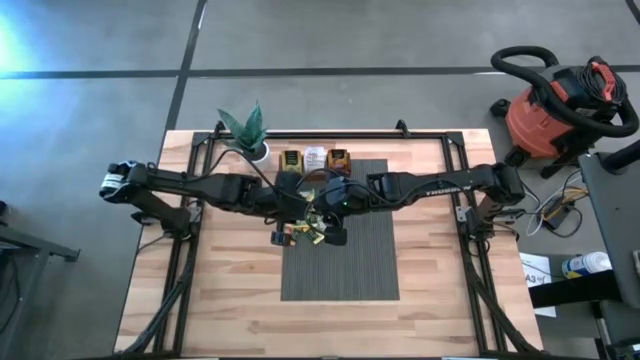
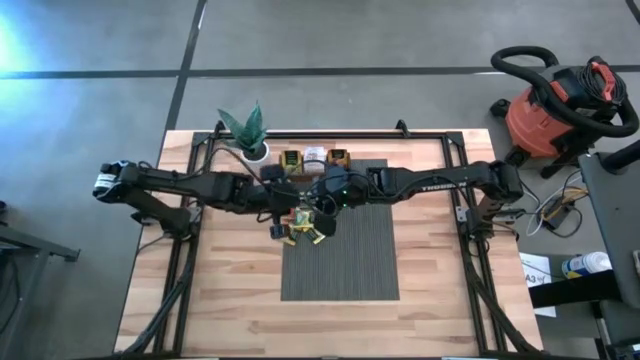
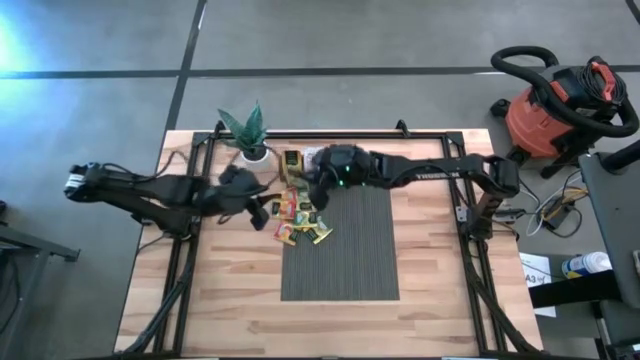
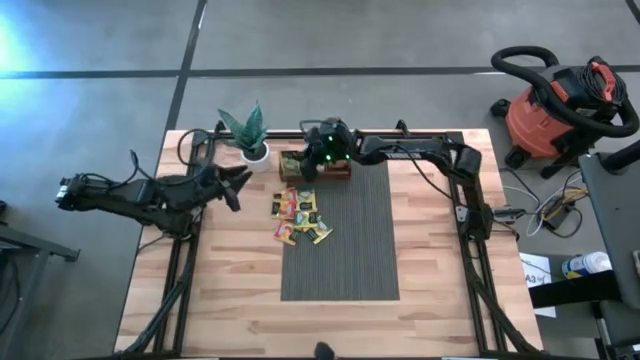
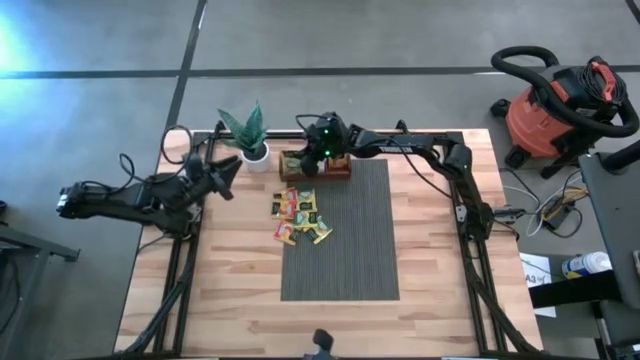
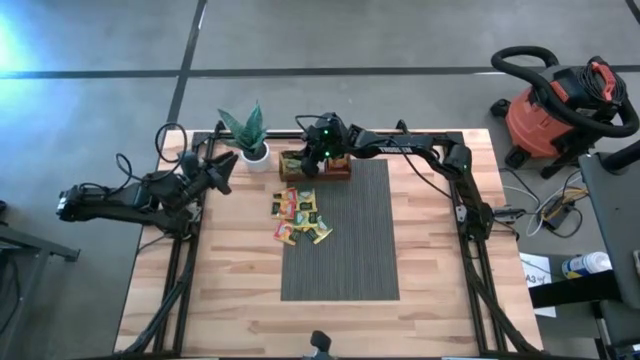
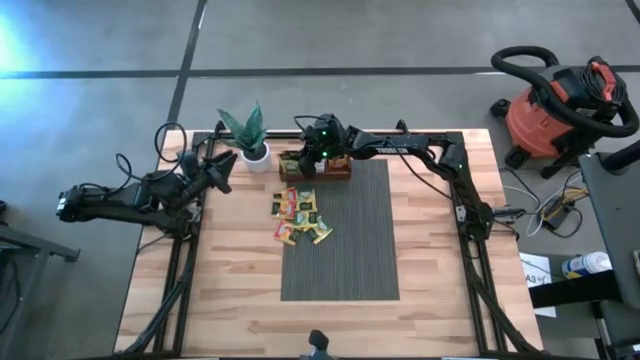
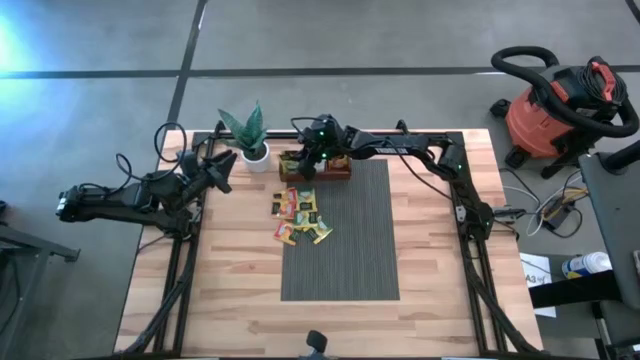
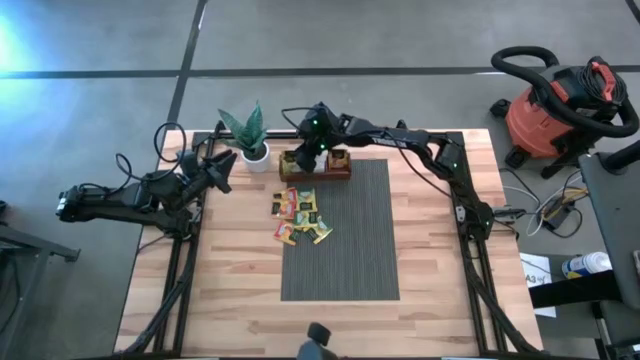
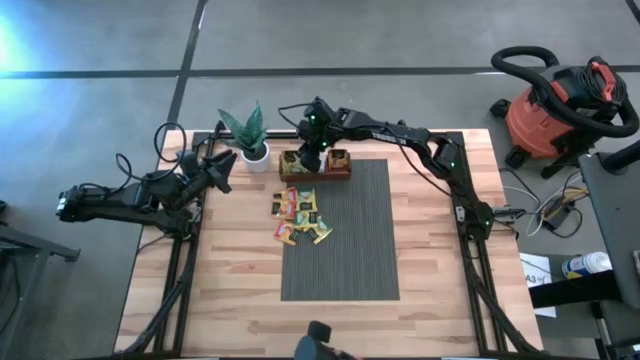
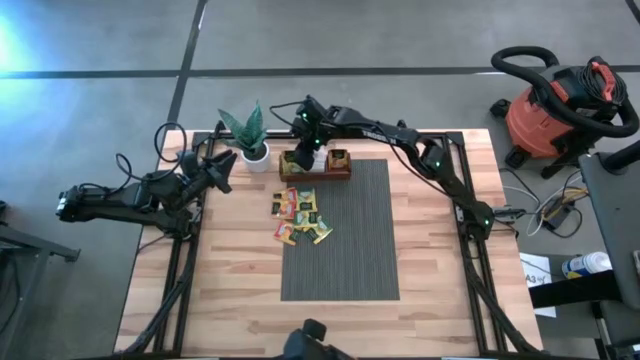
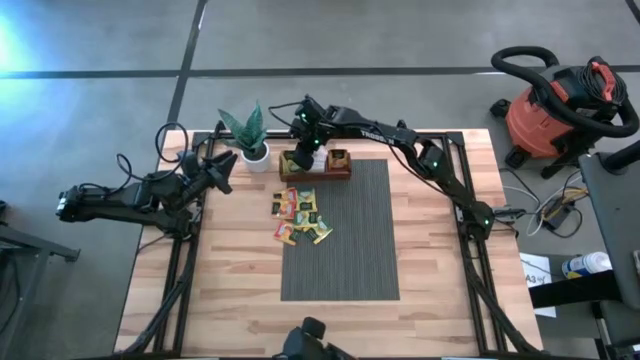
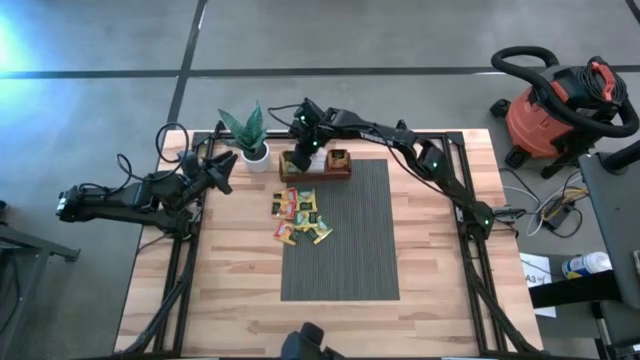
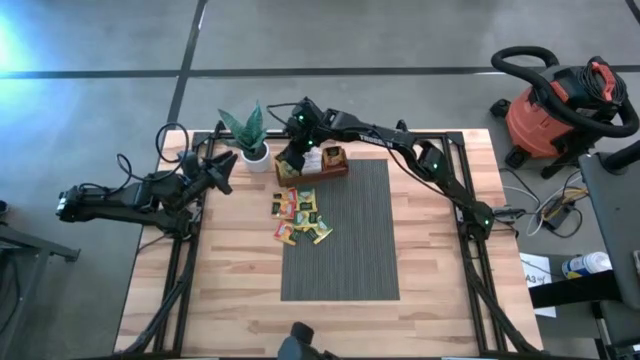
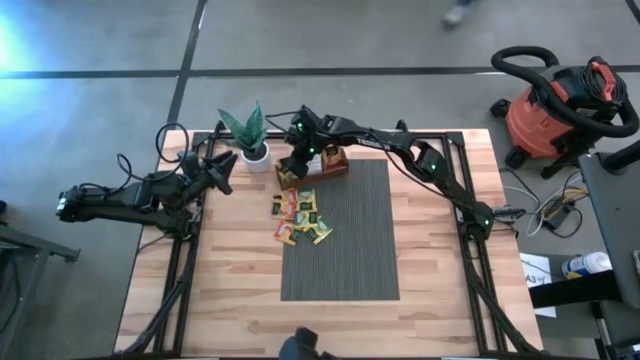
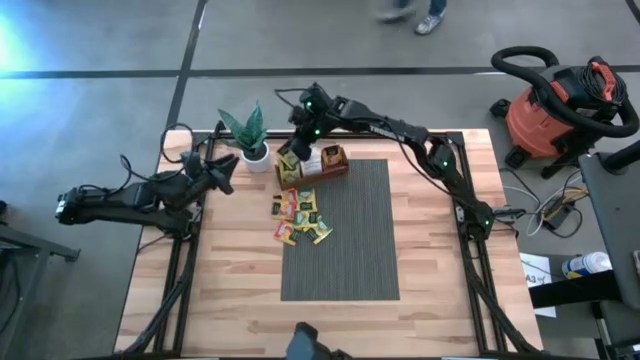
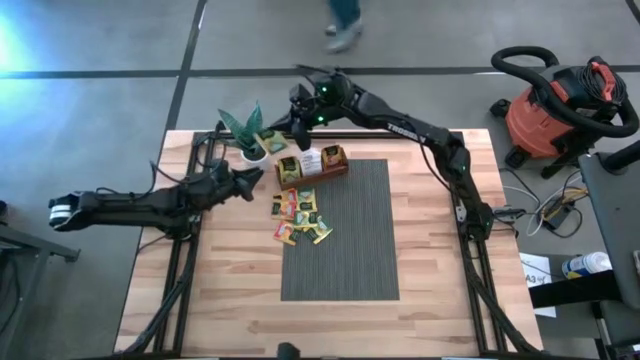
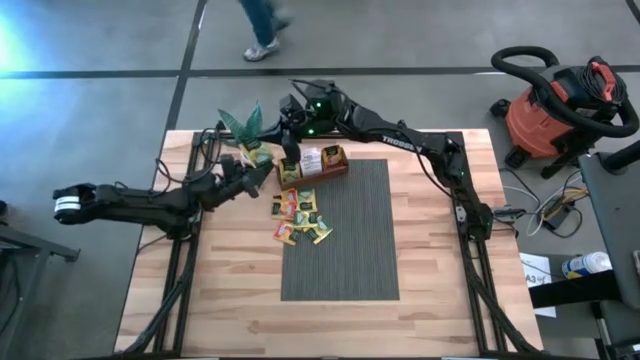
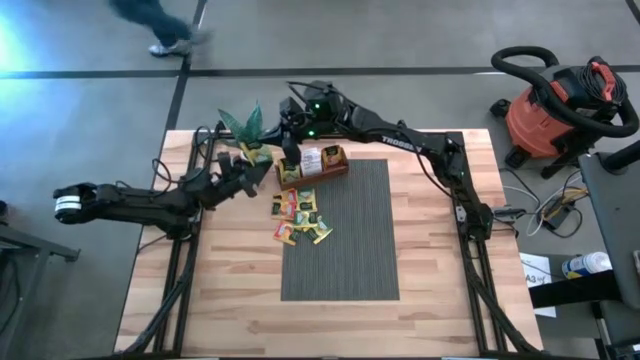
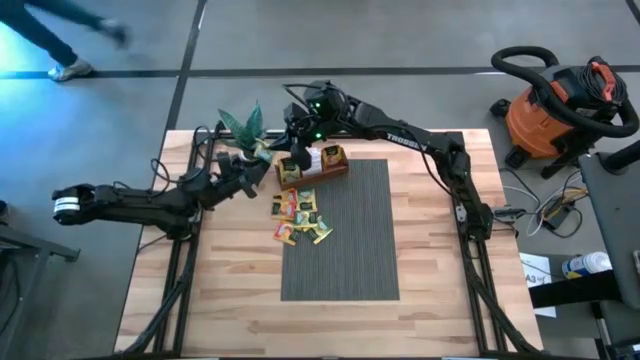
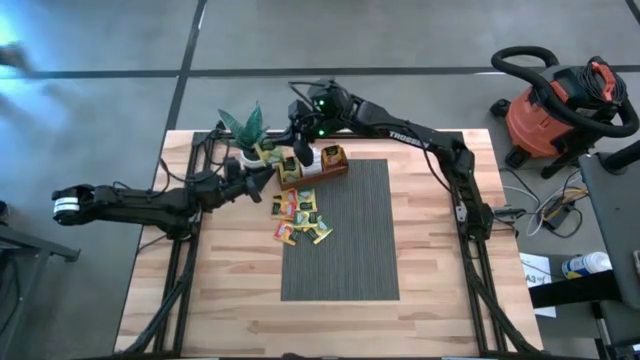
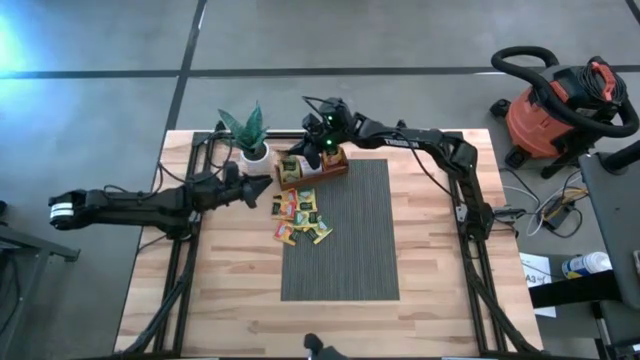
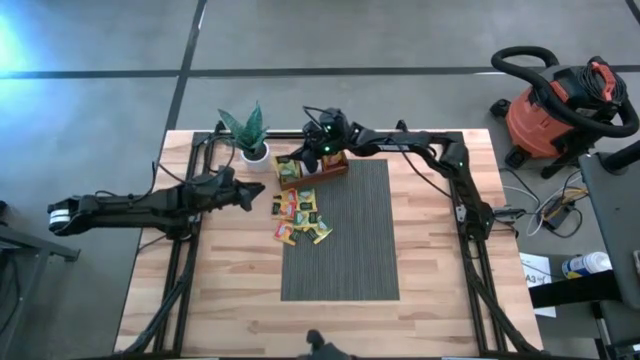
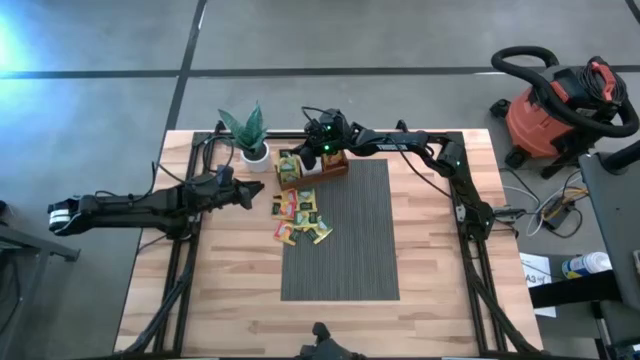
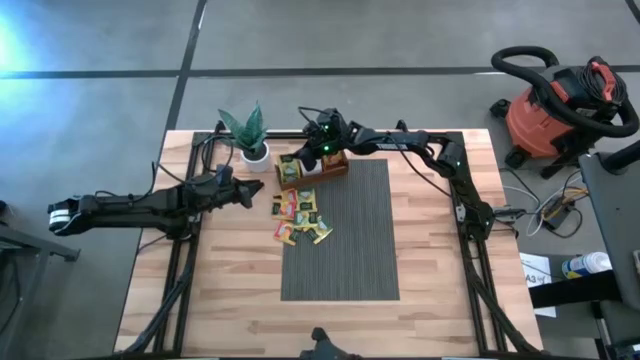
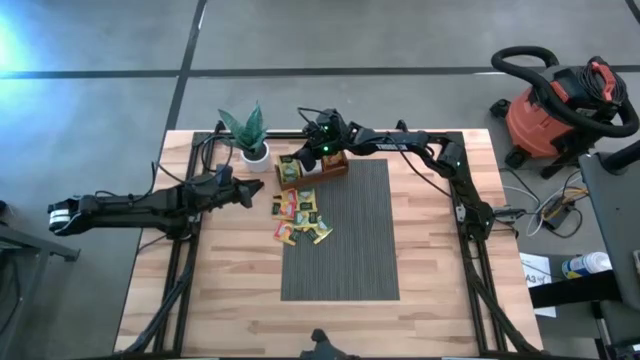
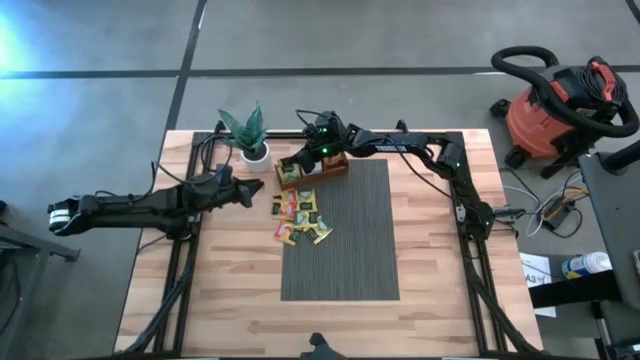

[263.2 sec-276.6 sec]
Task: Pick & Place Tea
Put the yellow tea bag into the left compartment of the wooden organizer

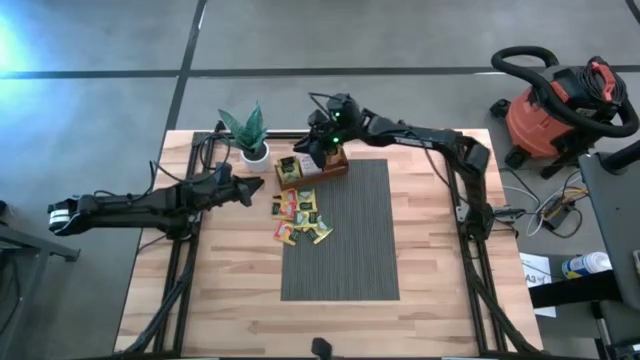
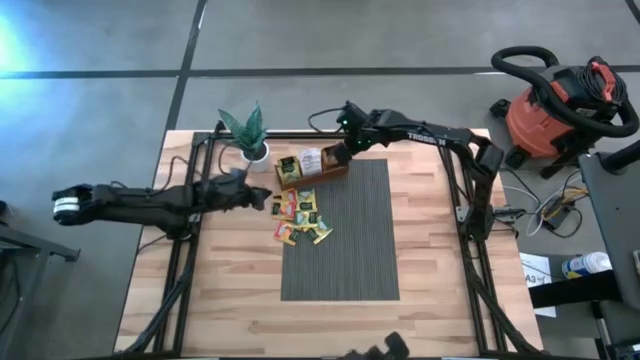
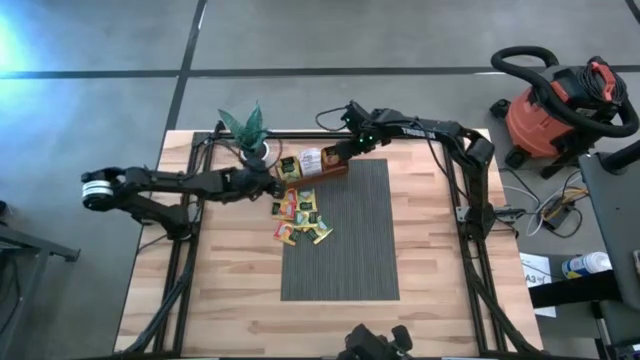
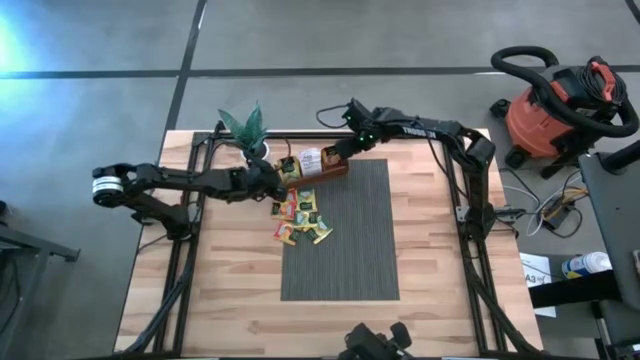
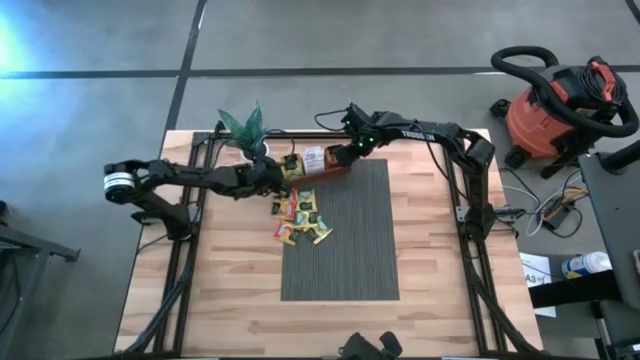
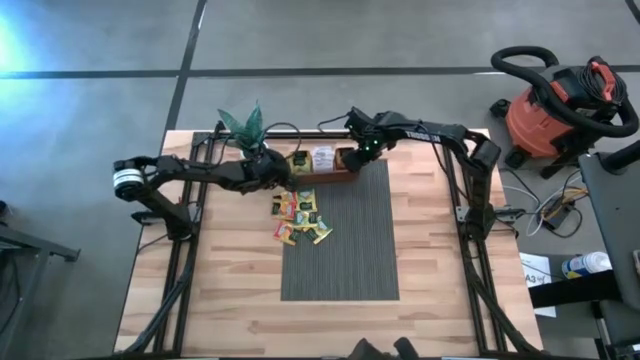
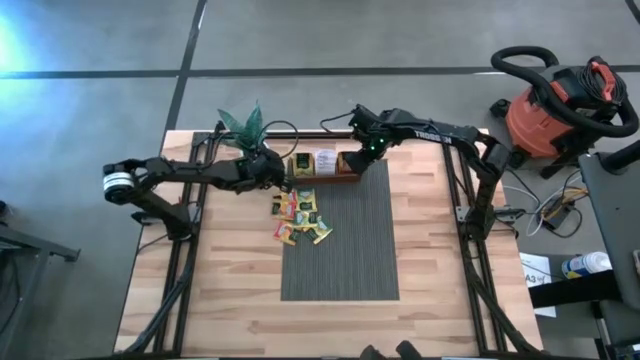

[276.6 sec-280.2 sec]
Adjust the wooden organizer on the table

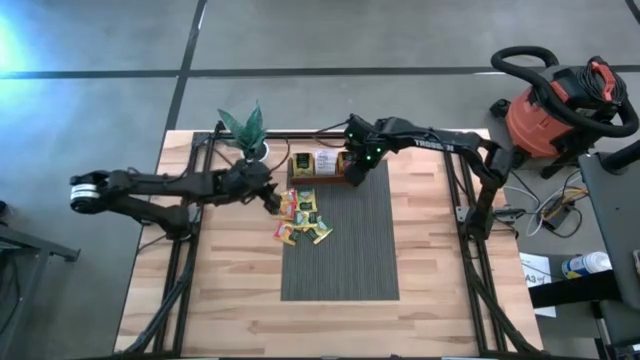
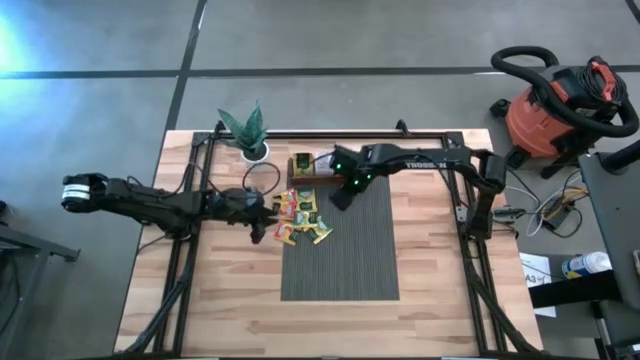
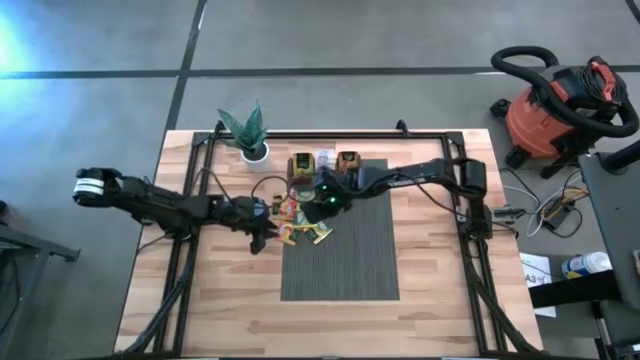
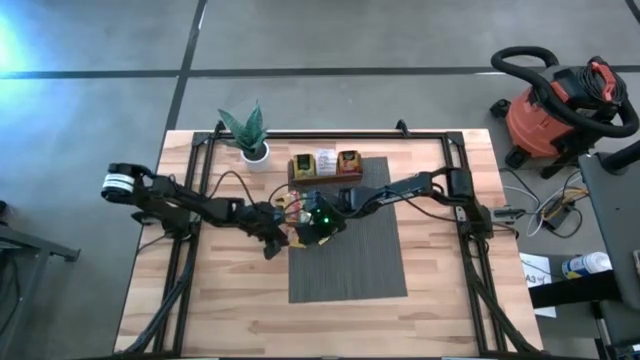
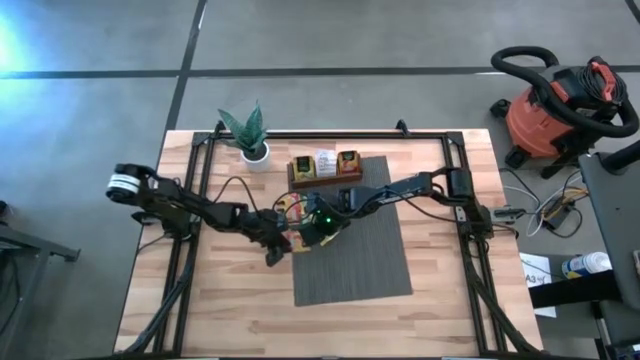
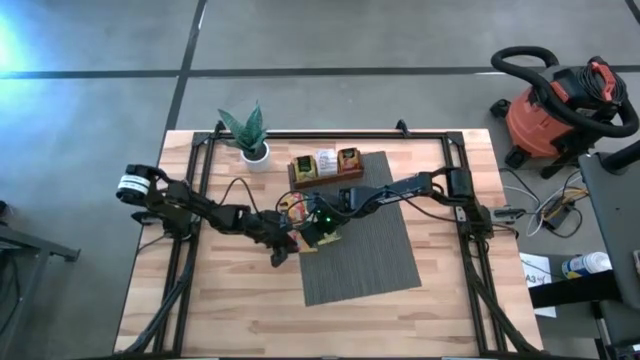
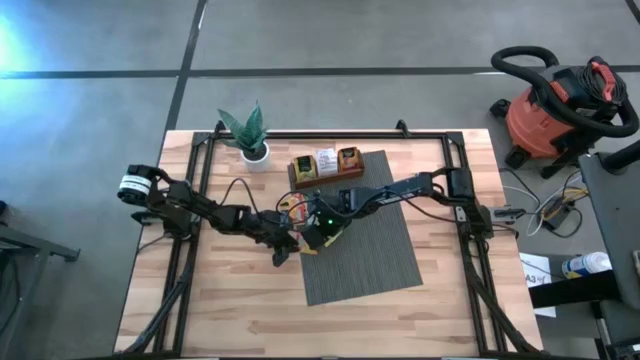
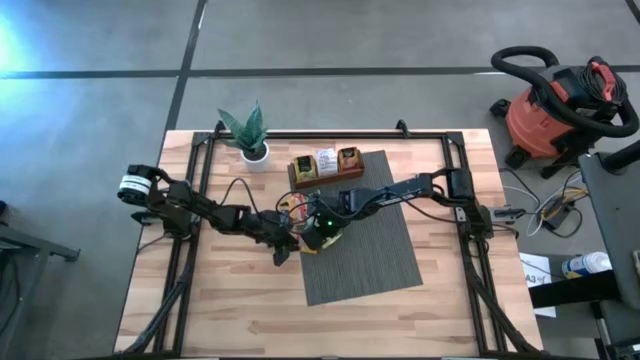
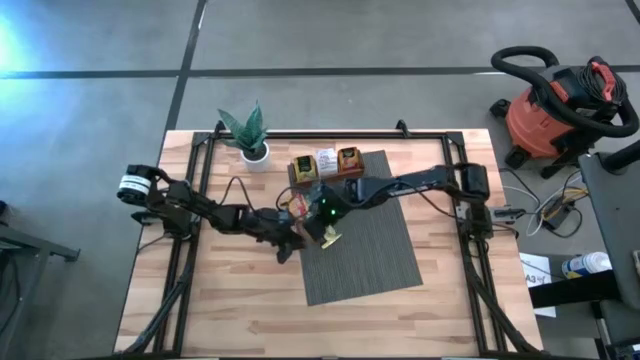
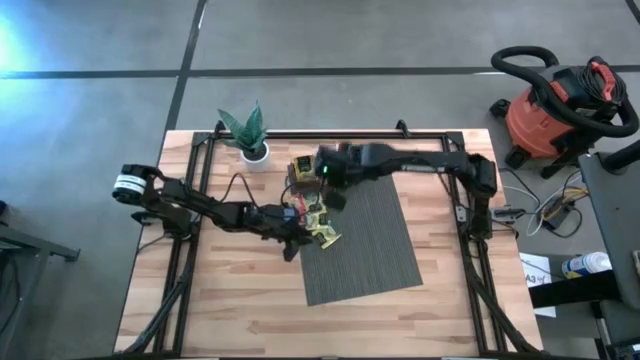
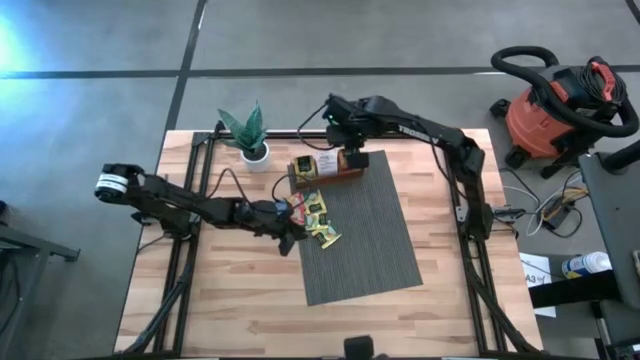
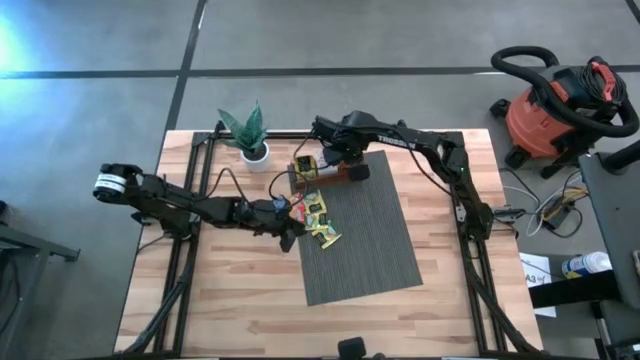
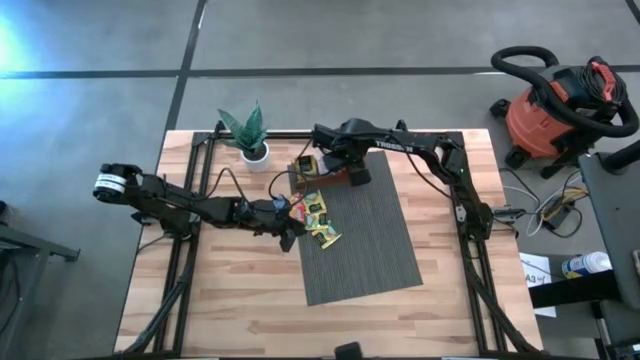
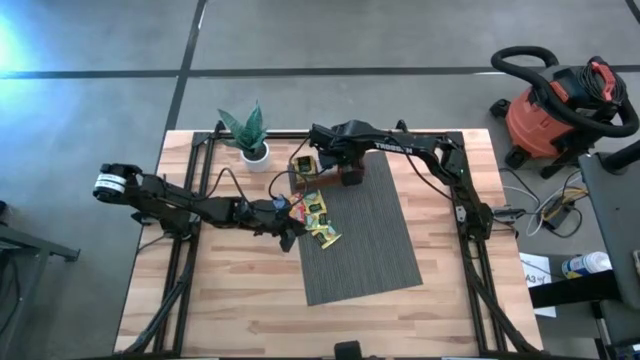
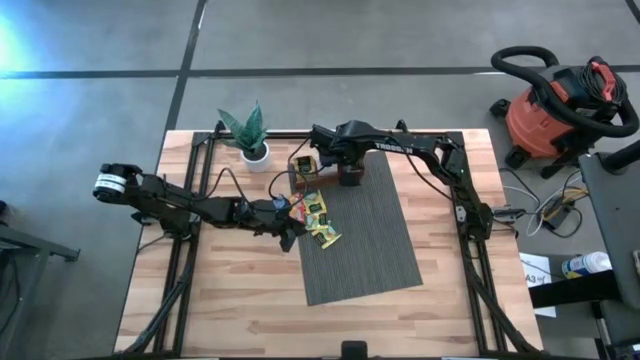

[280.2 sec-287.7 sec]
Put the bottom orange tea bag into the right compartment of the wooden organizer
